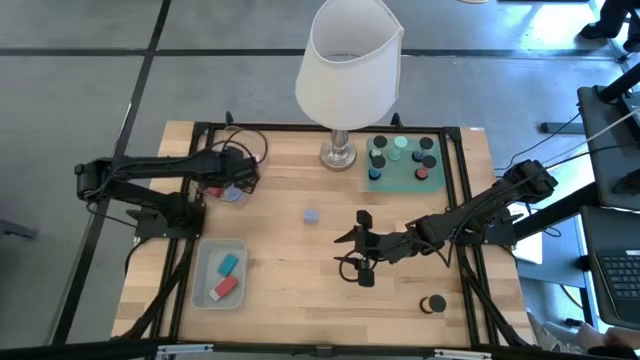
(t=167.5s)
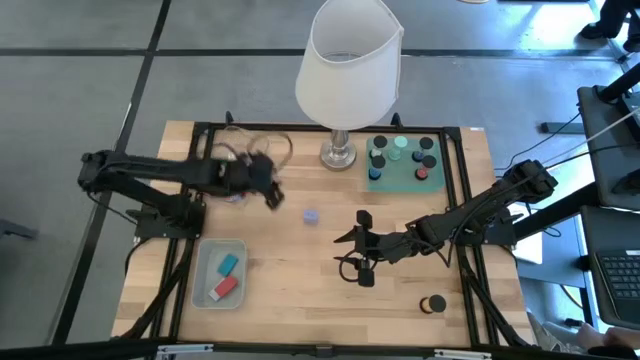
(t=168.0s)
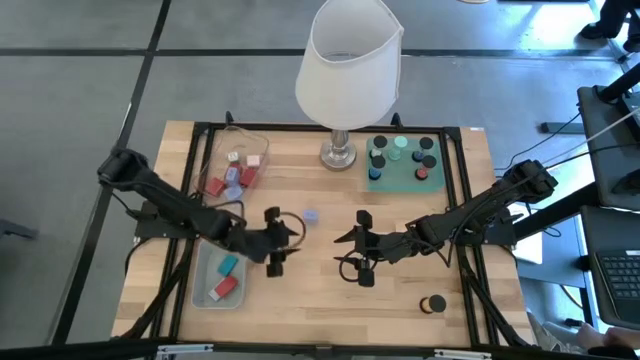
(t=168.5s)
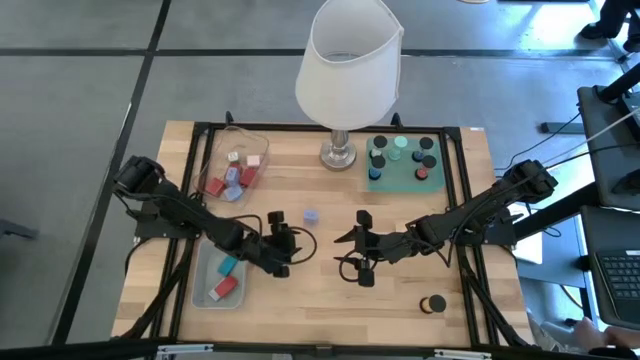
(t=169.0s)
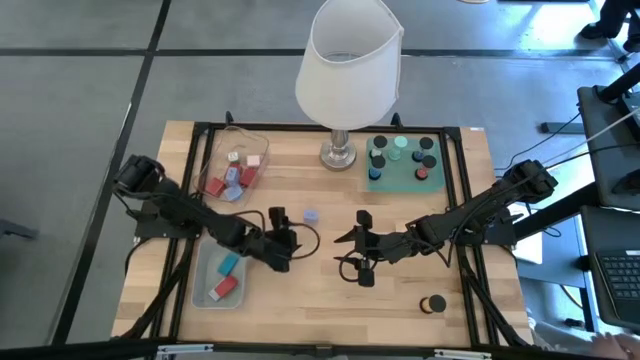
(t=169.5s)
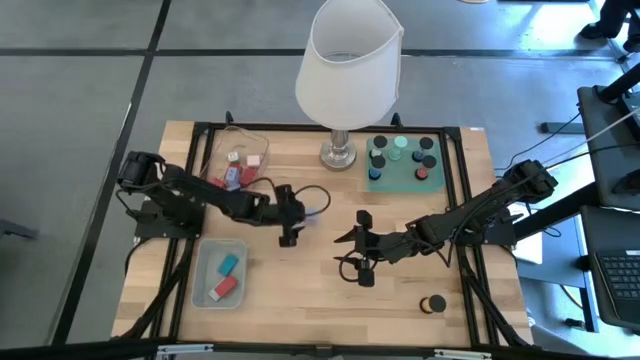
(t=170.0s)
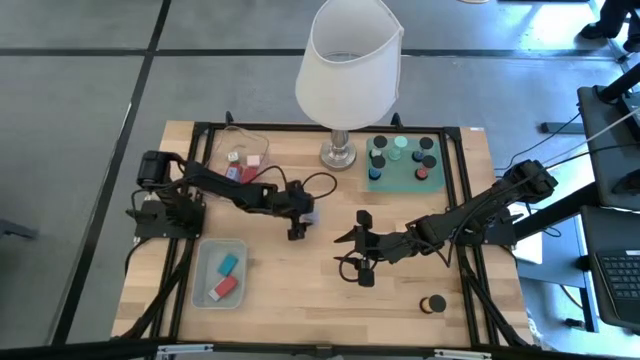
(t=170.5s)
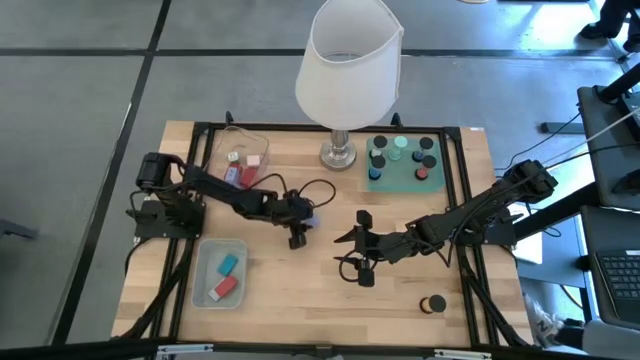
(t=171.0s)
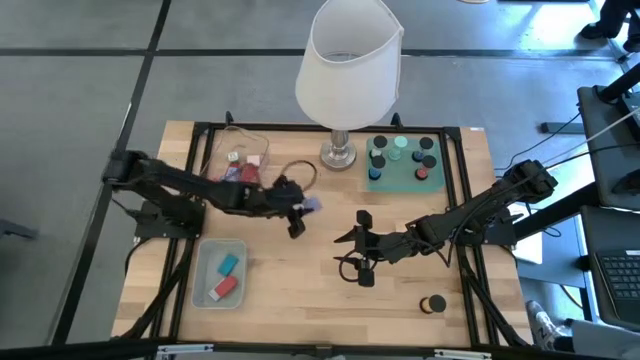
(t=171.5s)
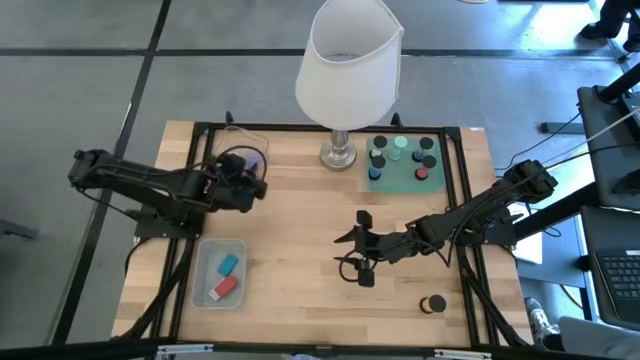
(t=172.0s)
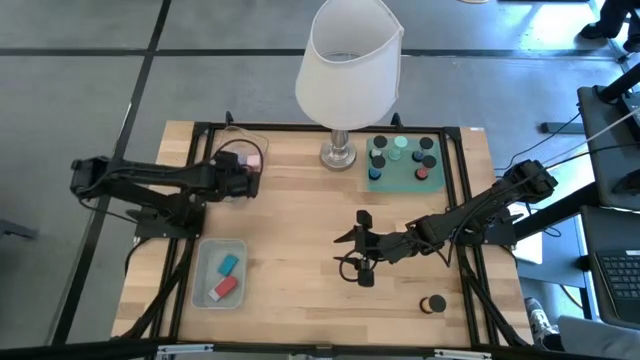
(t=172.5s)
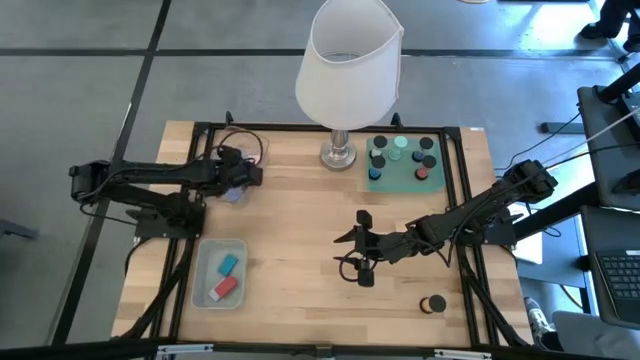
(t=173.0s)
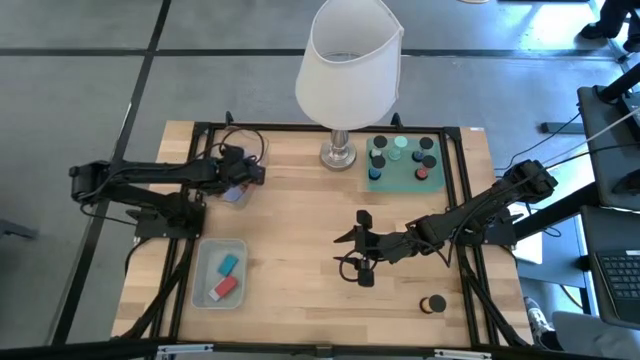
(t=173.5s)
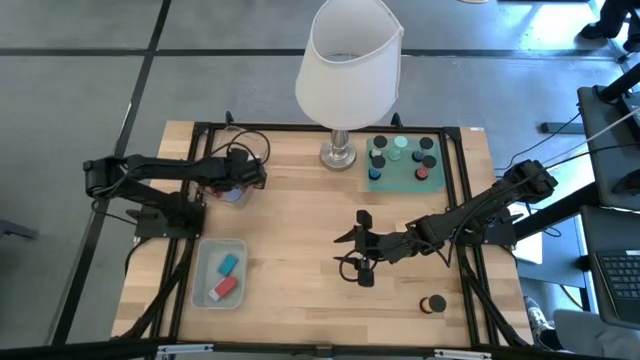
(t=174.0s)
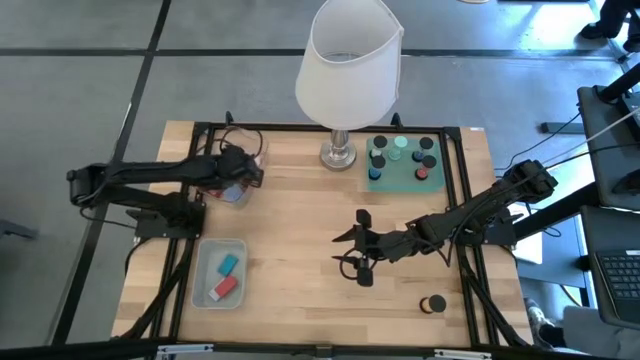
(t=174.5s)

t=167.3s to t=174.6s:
Task: Pick & Place Office items
Put the light blue charger adapter into the transparent bin

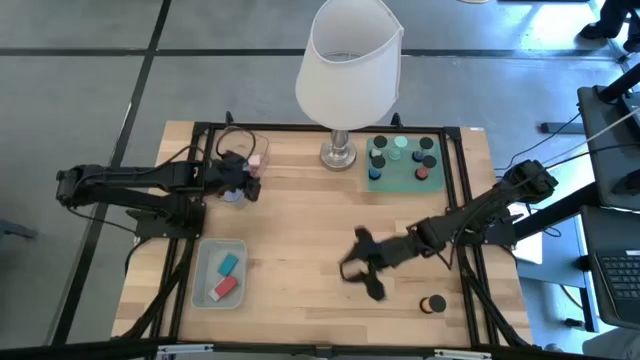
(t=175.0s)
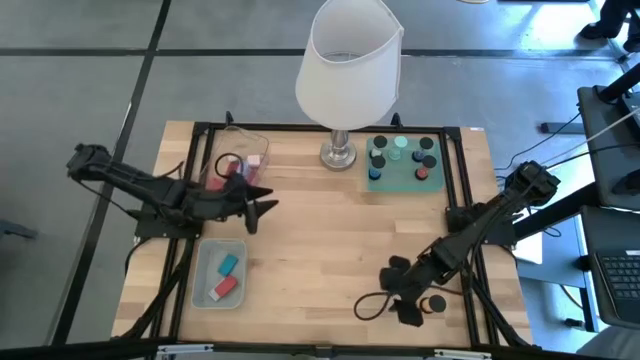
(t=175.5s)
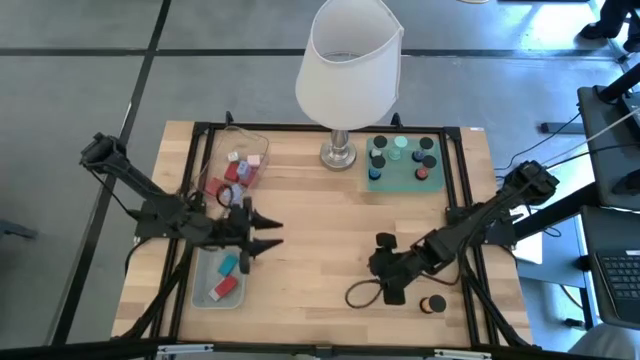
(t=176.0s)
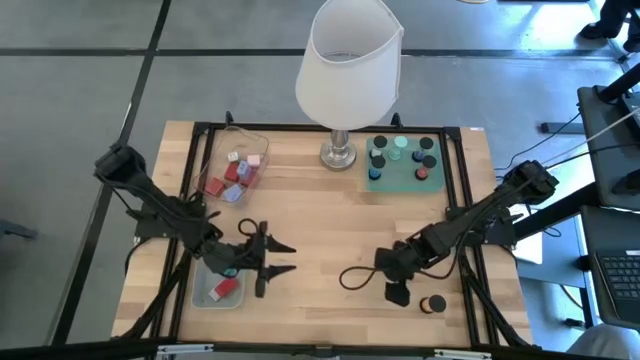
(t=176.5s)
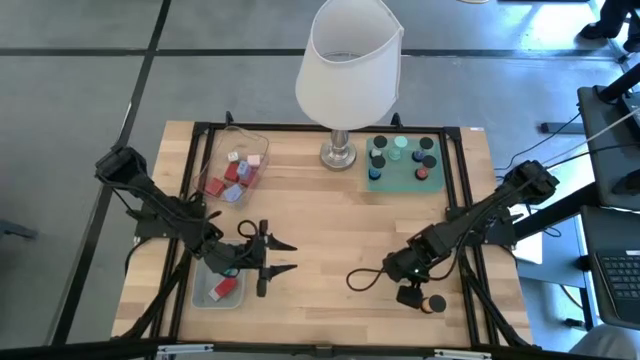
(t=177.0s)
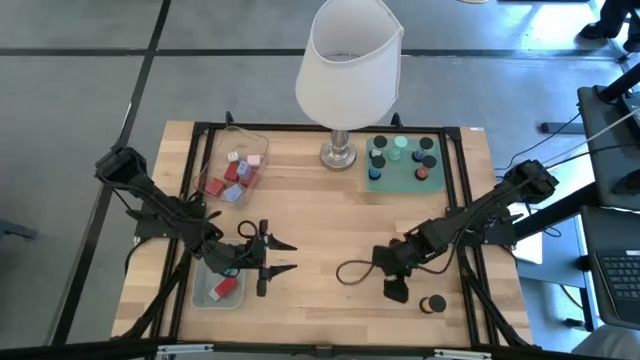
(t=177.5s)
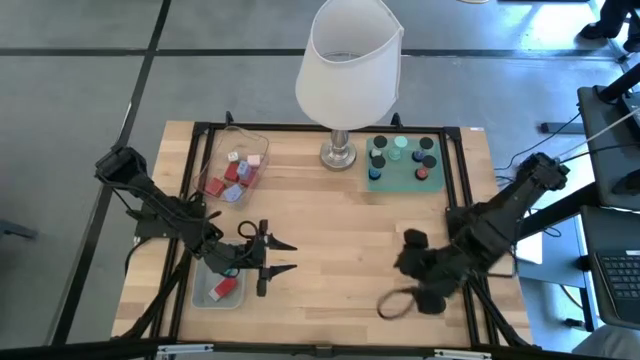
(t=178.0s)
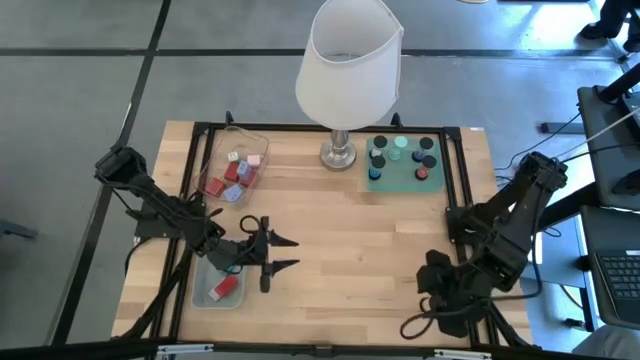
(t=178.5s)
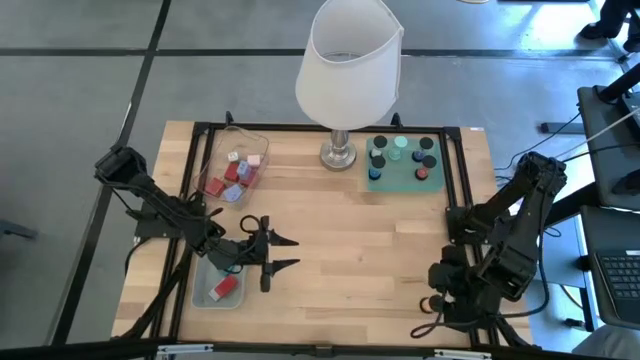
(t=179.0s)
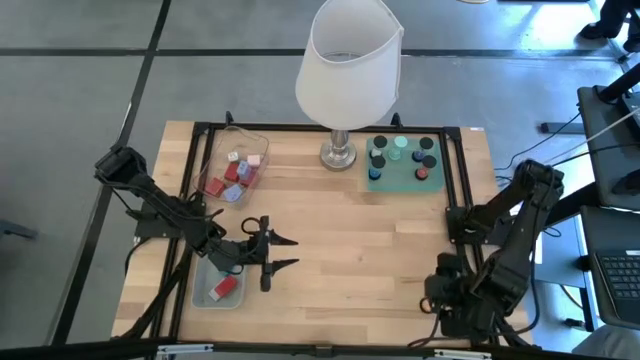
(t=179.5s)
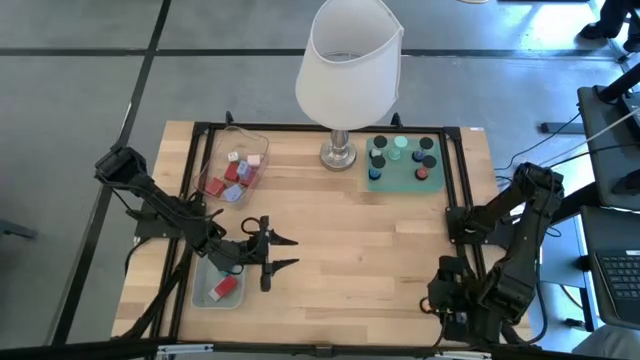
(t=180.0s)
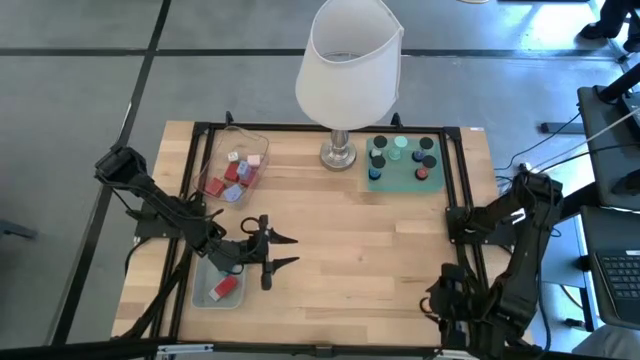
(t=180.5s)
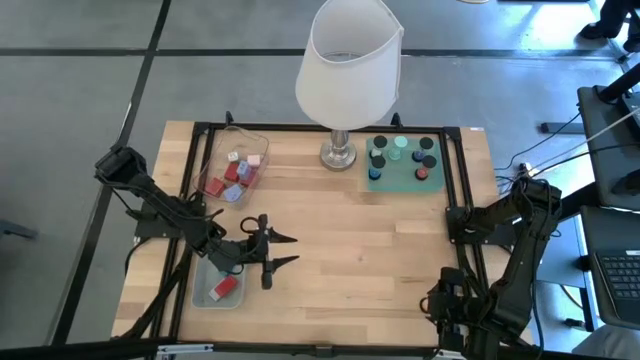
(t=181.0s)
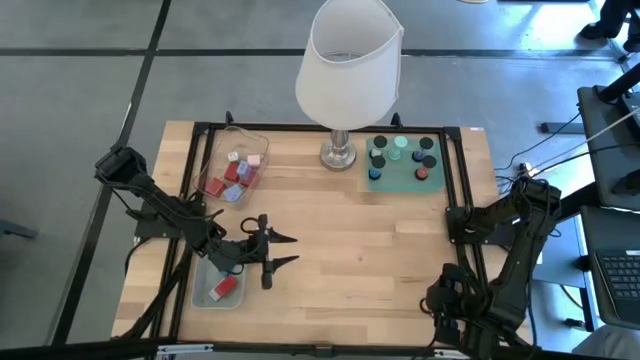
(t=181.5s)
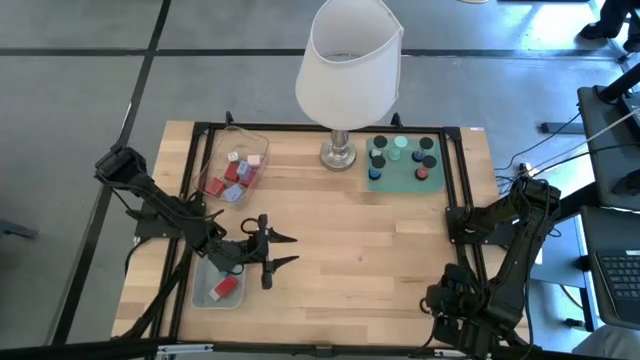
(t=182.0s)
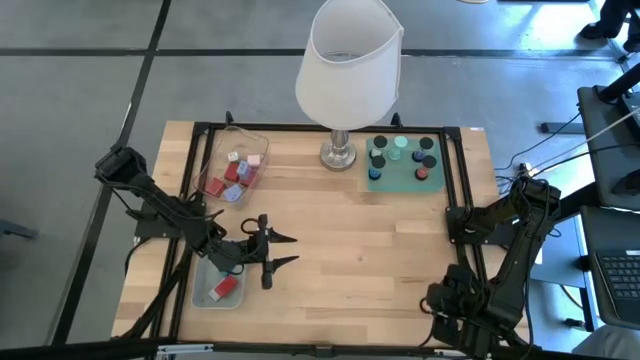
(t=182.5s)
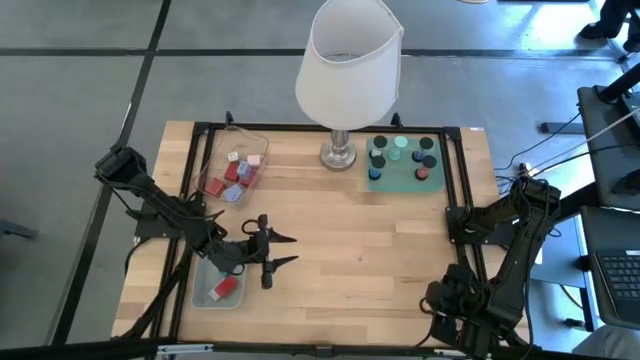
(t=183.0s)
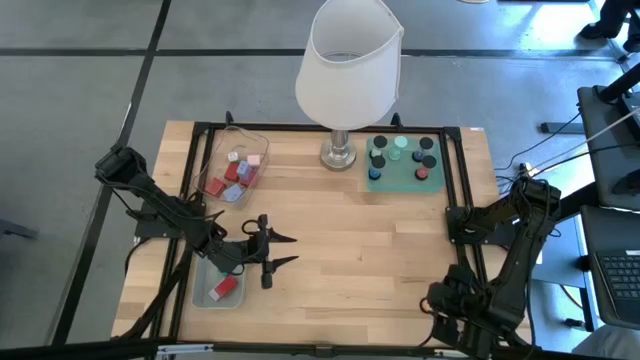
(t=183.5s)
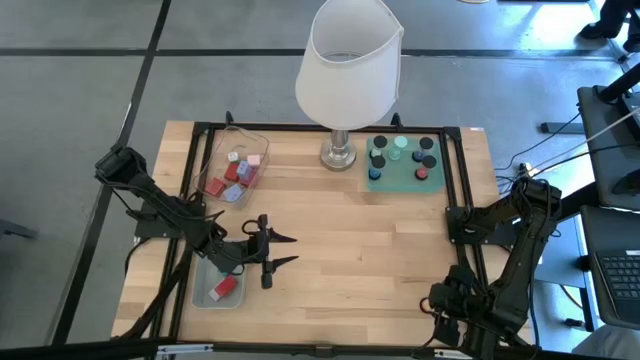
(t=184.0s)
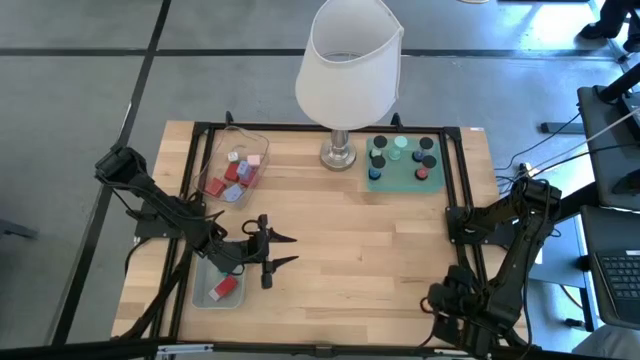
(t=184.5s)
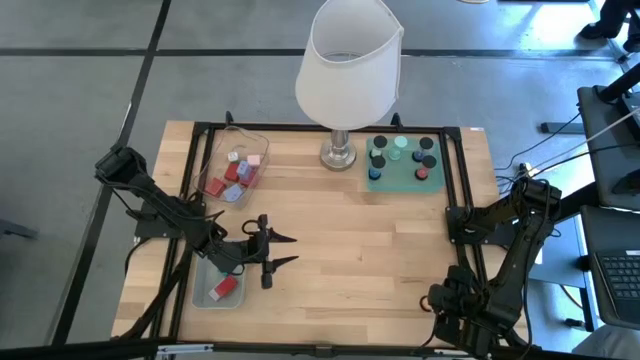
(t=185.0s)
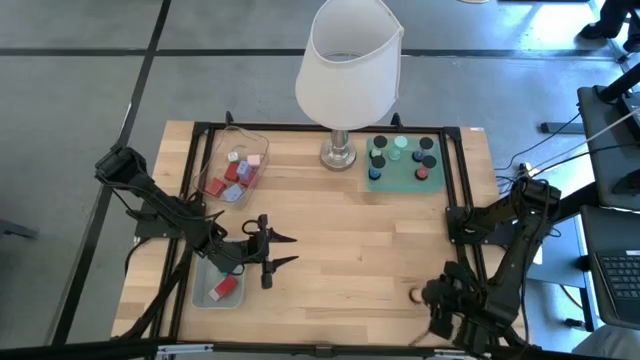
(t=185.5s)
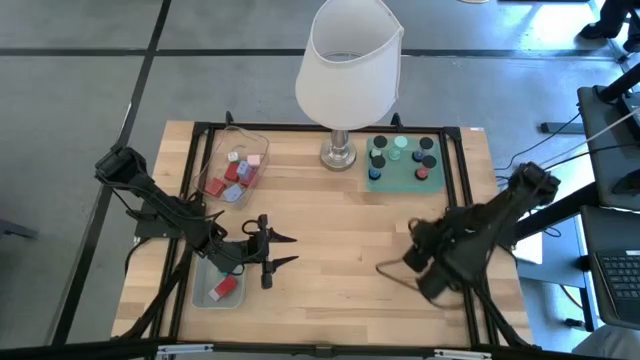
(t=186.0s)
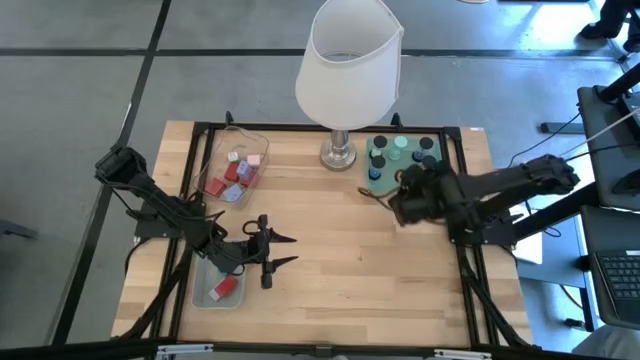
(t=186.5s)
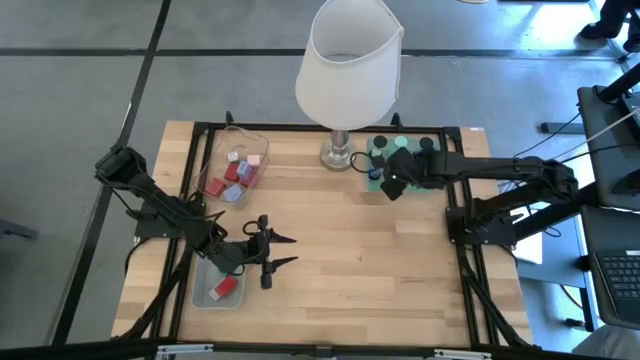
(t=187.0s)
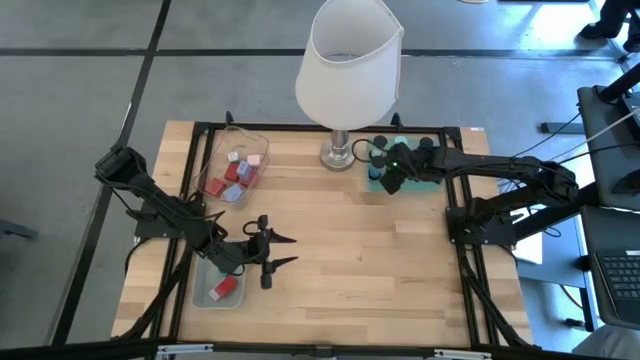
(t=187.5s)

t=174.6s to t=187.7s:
Put the yellow hourglass into the green bin
